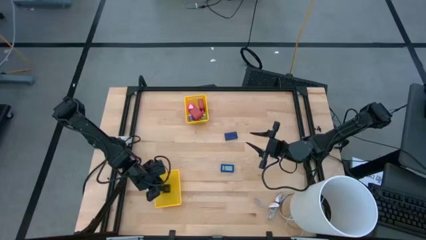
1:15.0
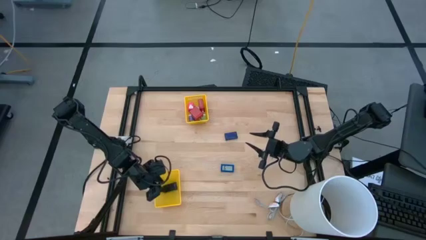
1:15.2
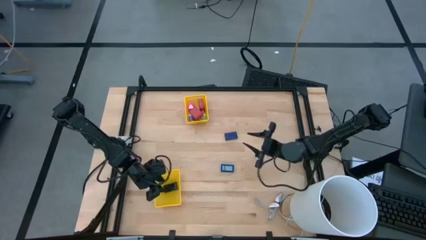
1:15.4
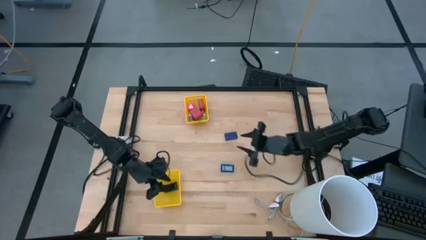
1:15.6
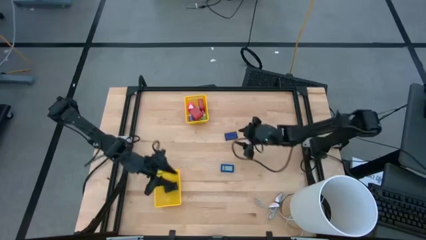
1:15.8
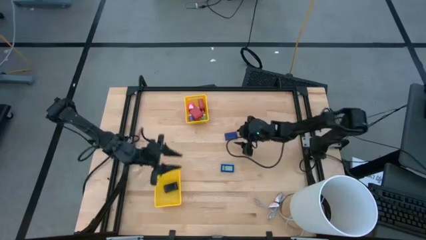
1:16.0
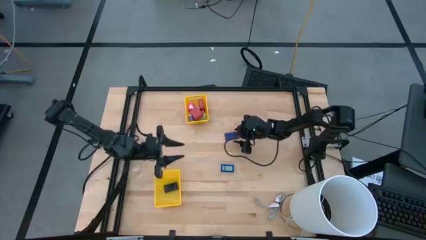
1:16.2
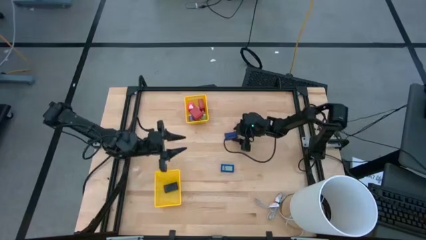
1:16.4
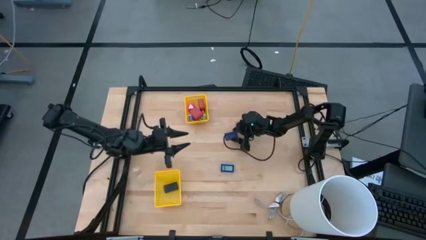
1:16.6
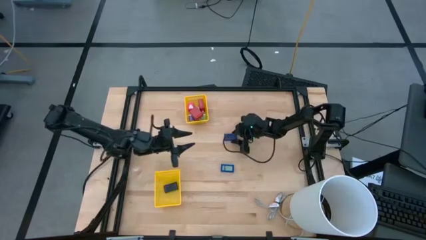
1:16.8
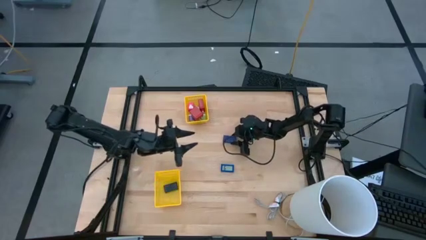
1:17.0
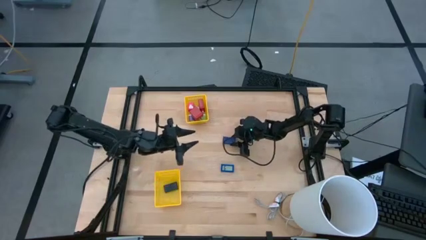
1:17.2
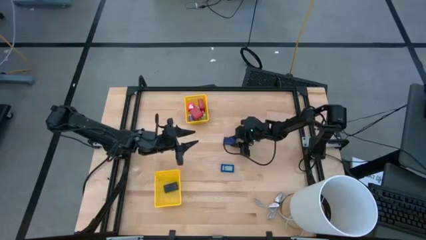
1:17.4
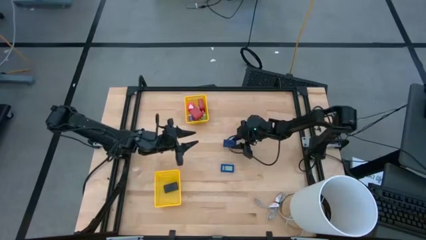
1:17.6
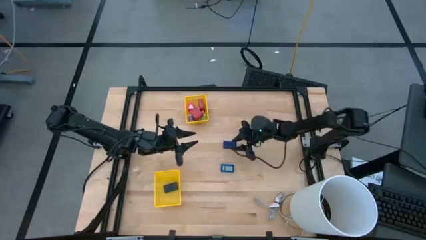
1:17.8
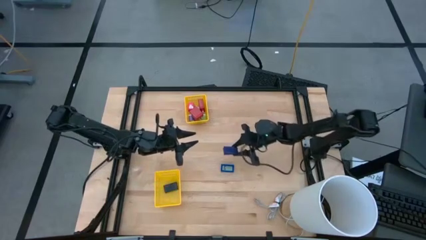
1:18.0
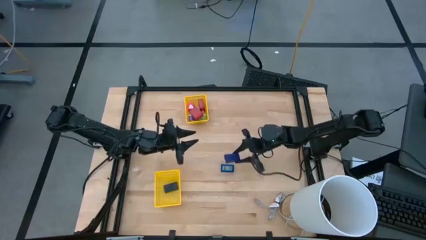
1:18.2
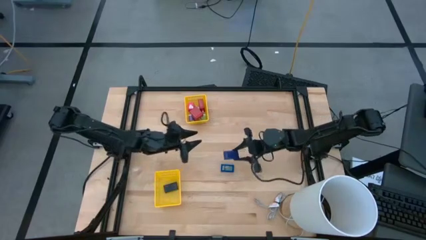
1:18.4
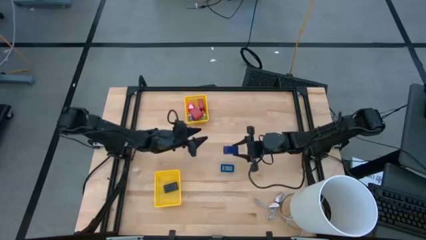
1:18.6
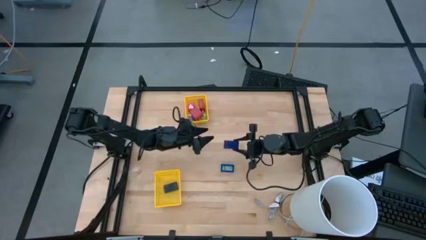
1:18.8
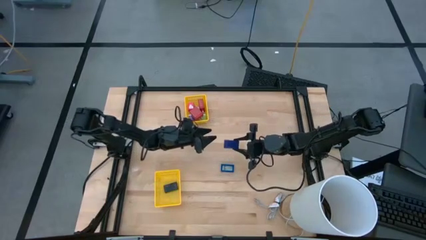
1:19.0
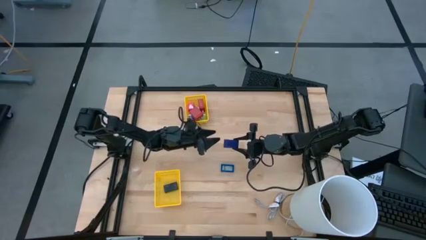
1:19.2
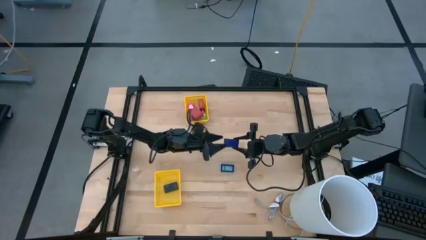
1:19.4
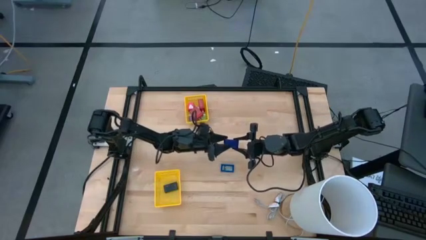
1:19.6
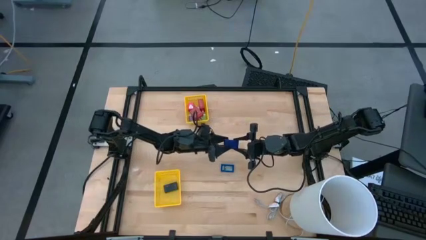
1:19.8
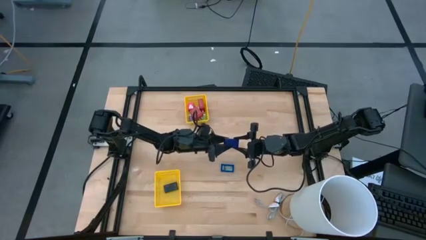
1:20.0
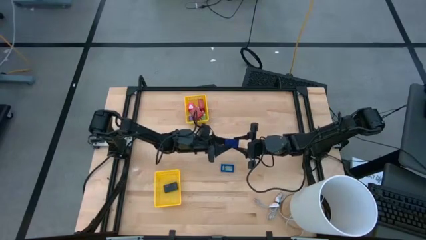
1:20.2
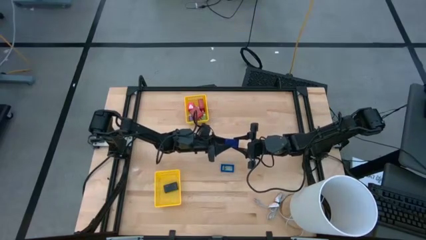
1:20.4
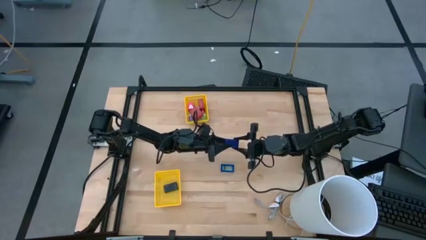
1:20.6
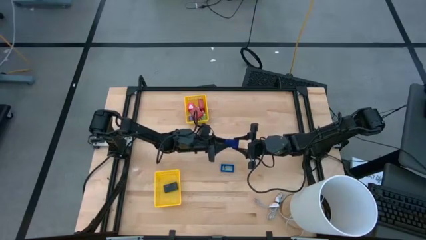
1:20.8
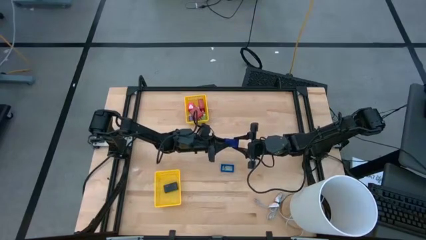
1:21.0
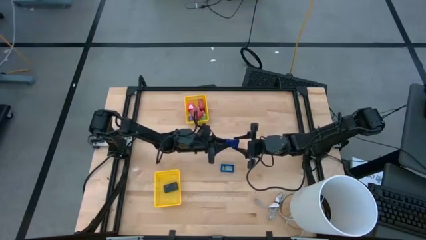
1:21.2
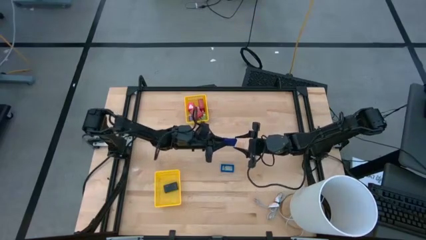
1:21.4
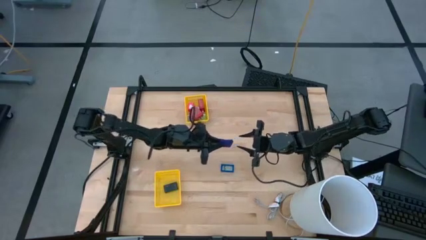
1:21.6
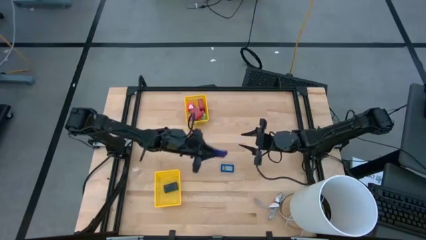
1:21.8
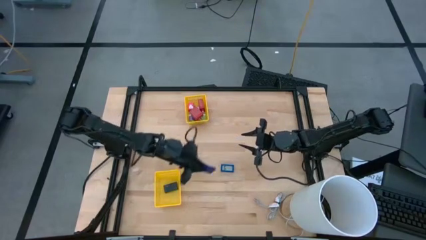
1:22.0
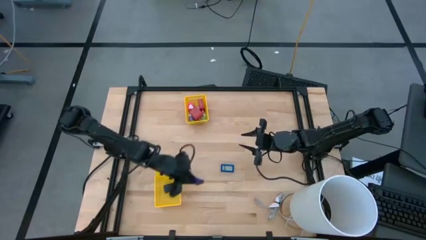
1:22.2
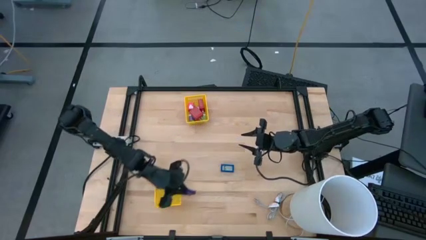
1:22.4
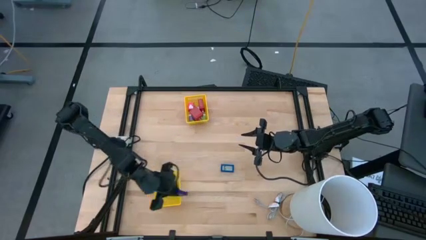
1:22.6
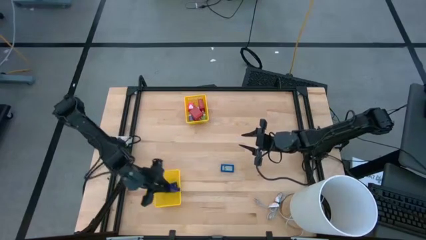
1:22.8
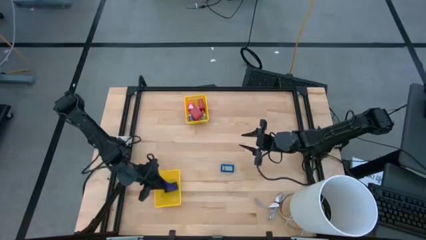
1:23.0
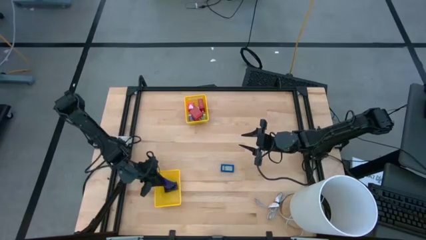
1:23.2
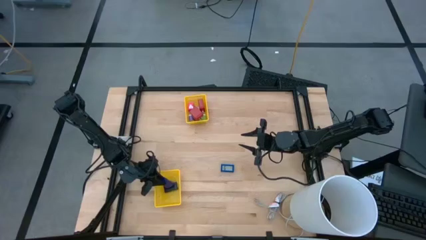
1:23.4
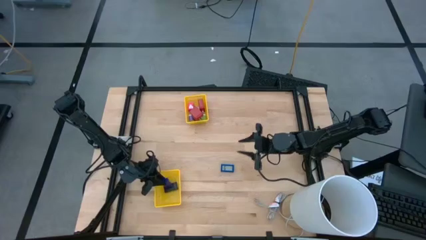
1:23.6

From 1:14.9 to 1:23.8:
Task: Pick & Place Office items
Put the top blue digital clock into the bottom yellow bin

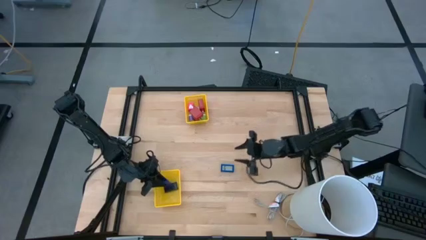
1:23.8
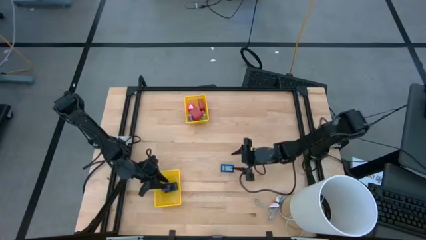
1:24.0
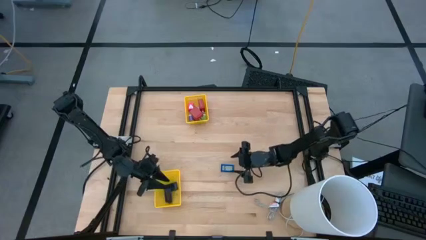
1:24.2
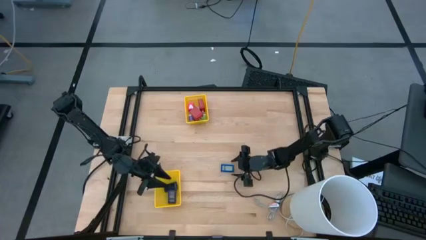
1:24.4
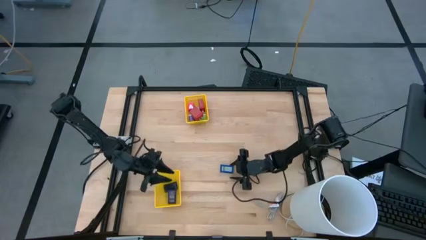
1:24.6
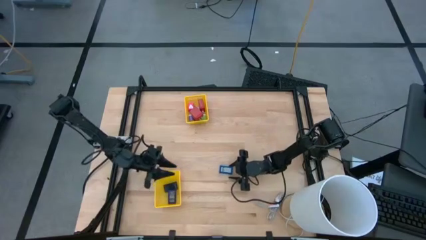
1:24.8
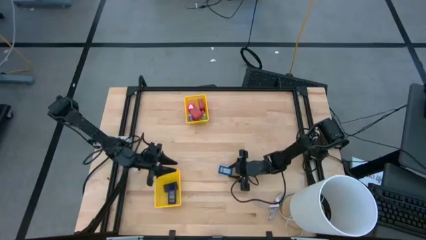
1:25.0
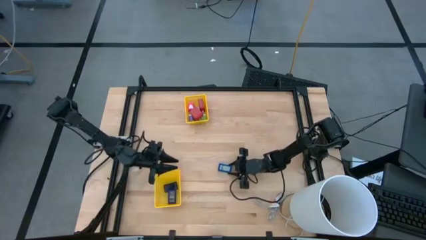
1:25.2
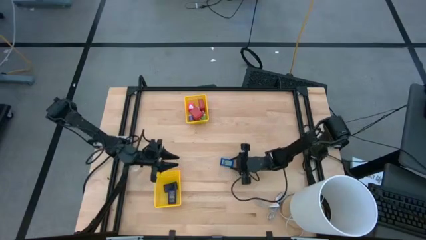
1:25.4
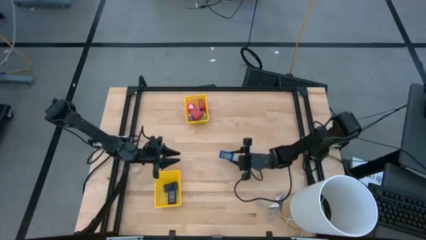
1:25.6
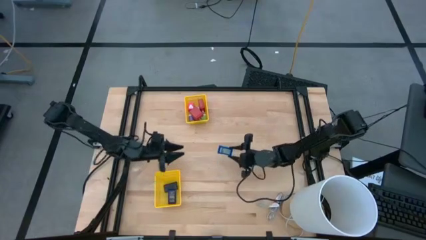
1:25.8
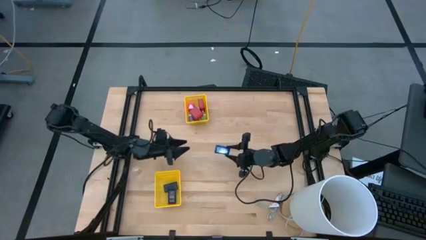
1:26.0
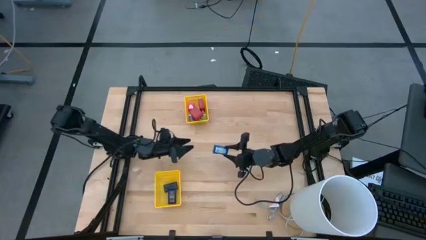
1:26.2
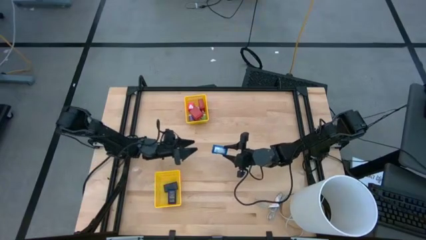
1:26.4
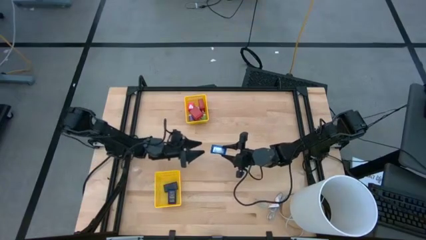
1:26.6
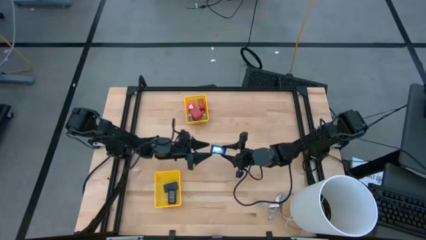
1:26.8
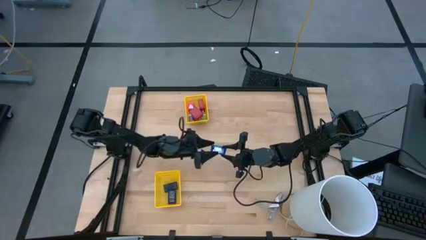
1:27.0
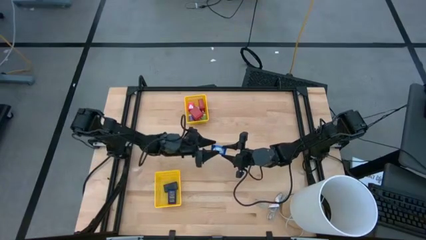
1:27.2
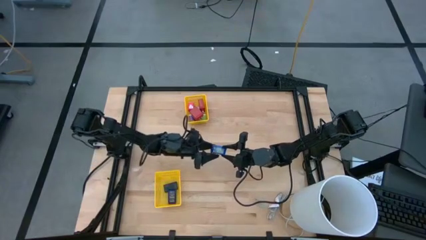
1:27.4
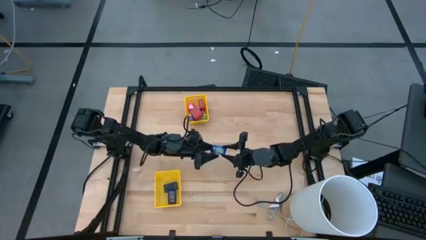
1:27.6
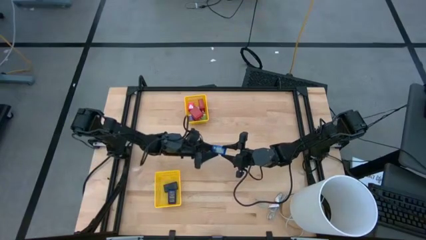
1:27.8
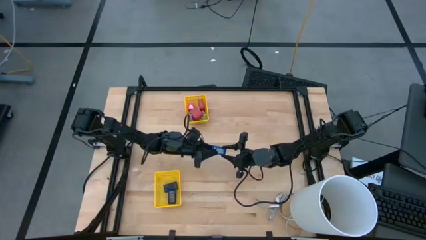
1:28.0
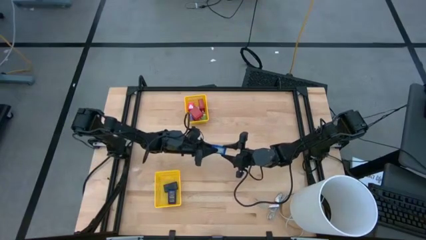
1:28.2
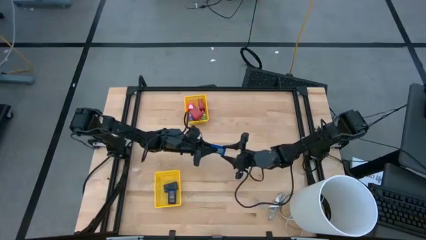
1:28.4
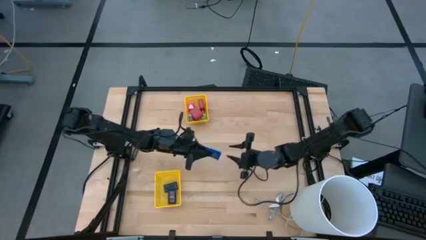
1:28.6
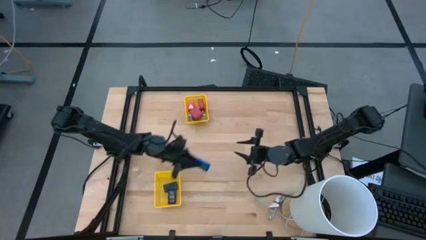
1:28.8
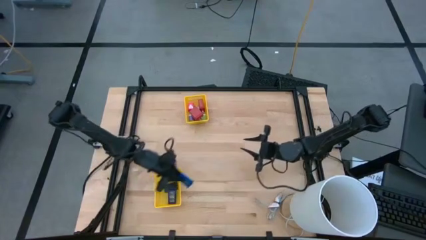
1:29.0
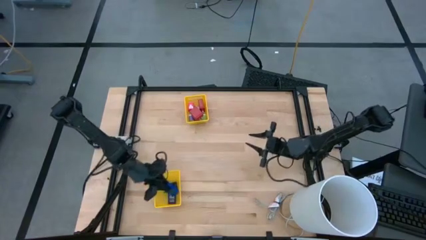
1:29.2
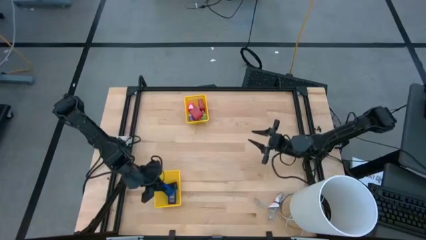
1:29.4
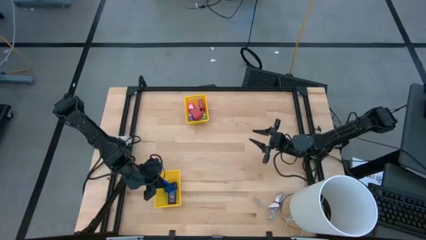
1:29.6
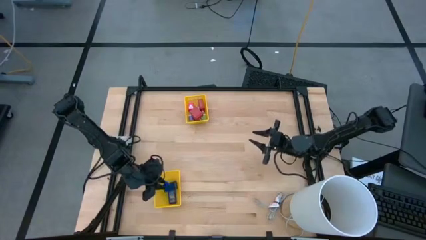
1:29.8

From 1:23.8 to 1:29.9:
Put the blue digital clock into the bottom yellow bin
